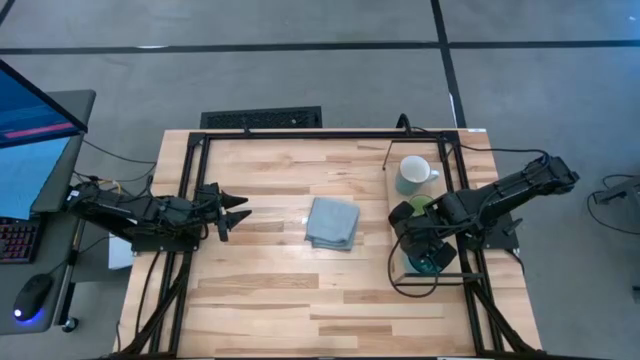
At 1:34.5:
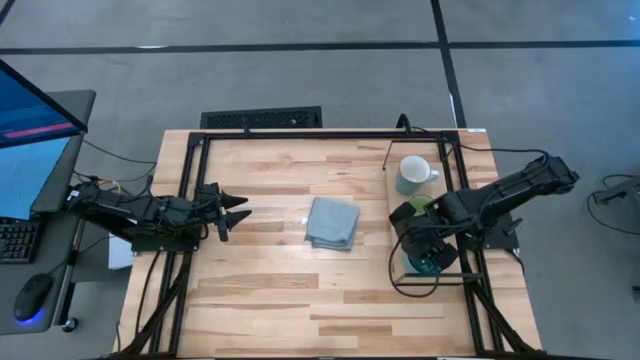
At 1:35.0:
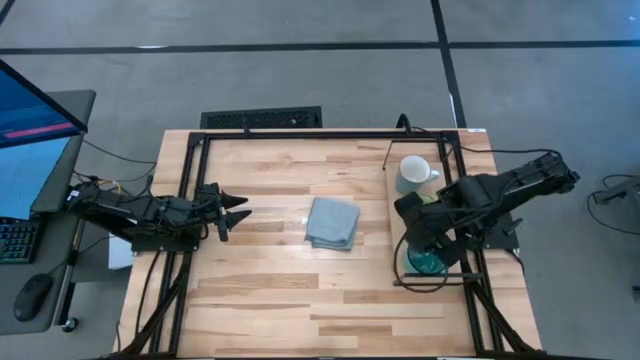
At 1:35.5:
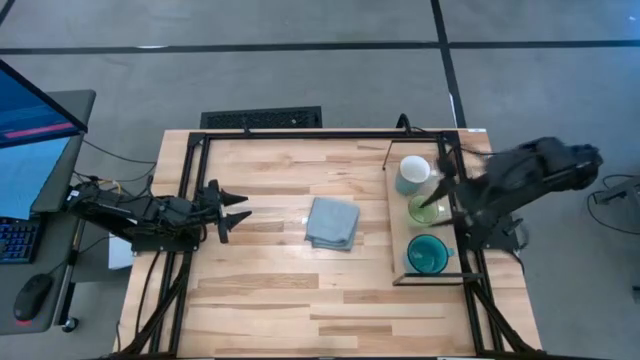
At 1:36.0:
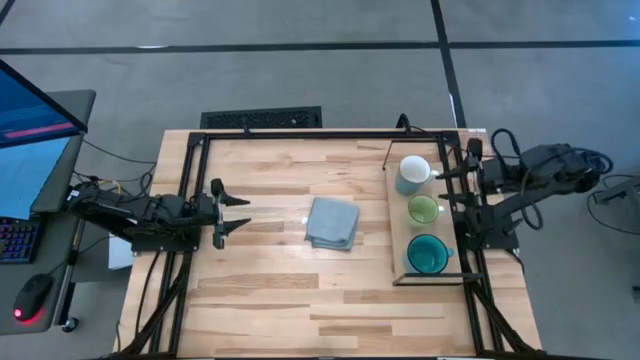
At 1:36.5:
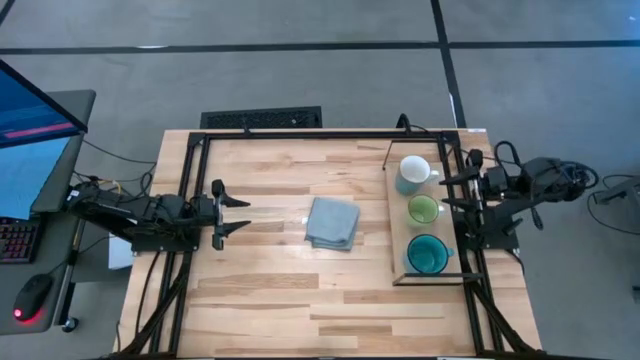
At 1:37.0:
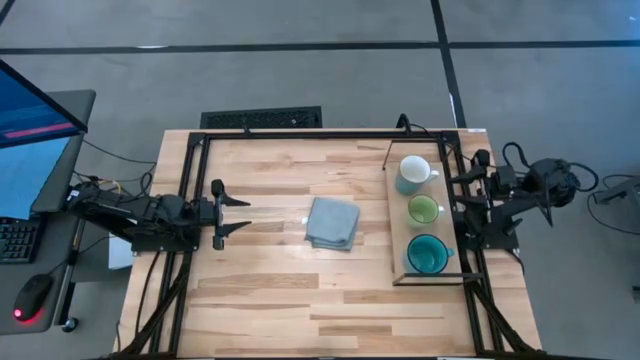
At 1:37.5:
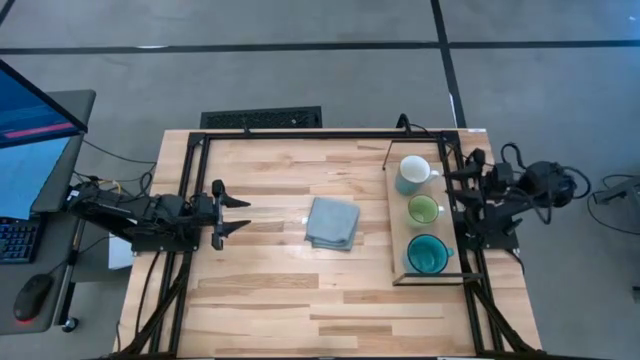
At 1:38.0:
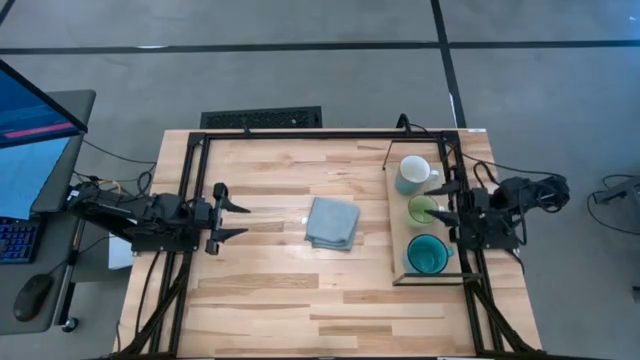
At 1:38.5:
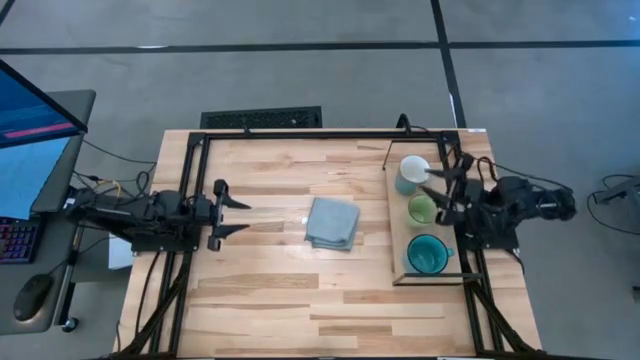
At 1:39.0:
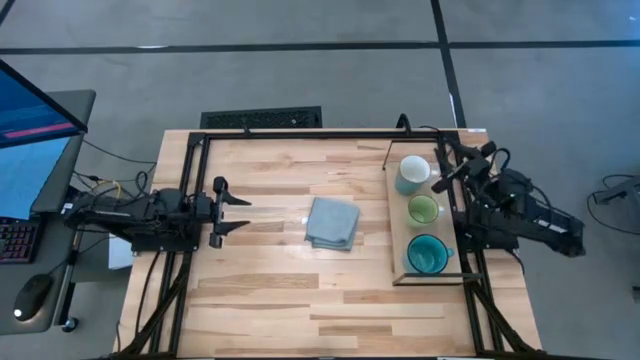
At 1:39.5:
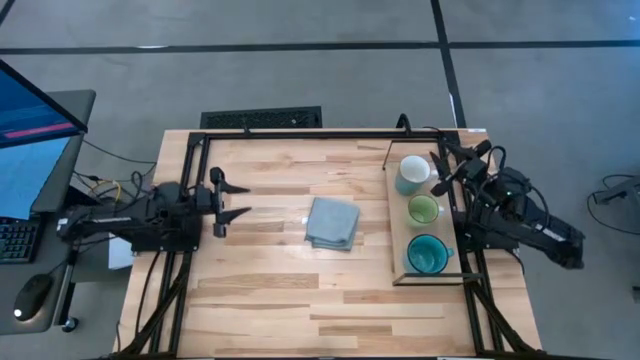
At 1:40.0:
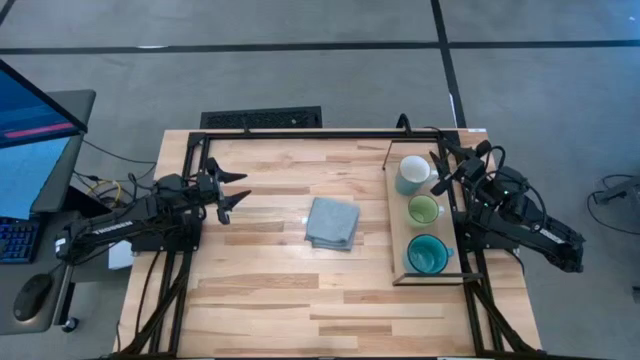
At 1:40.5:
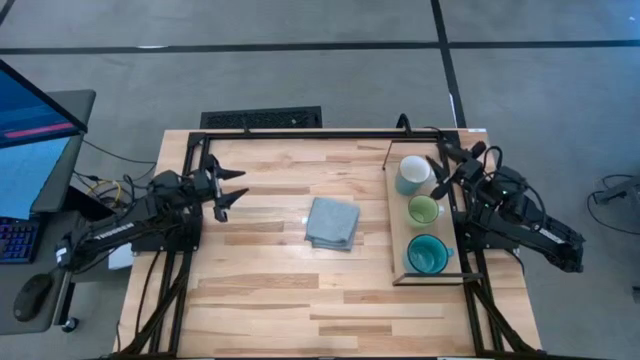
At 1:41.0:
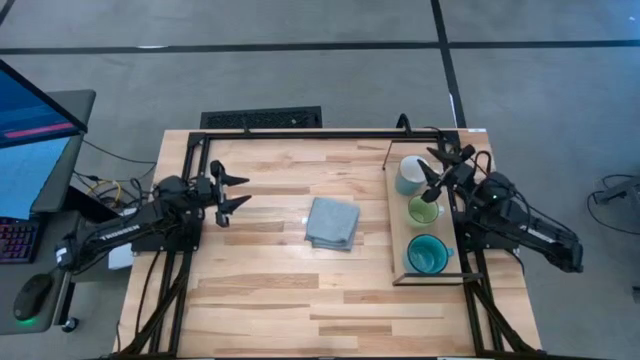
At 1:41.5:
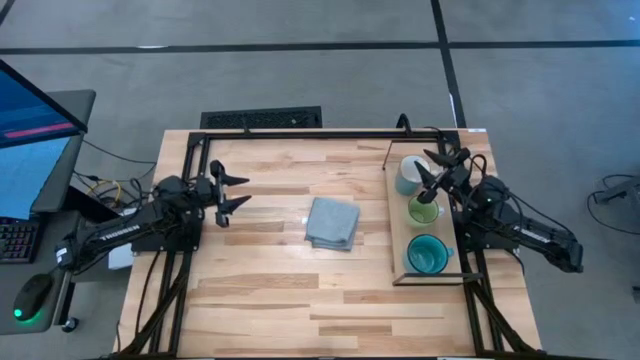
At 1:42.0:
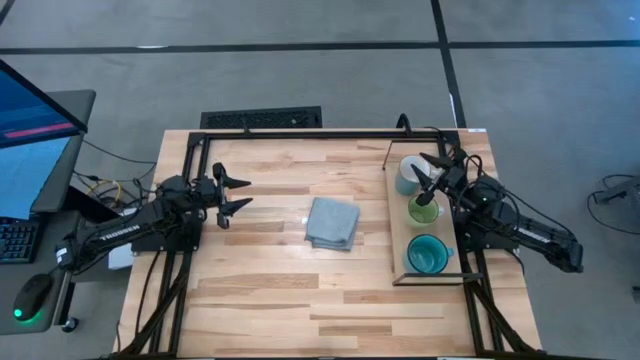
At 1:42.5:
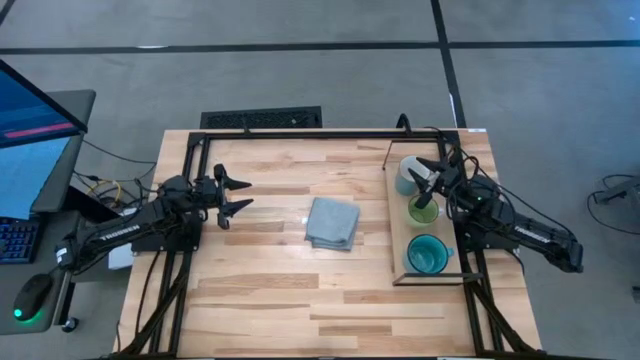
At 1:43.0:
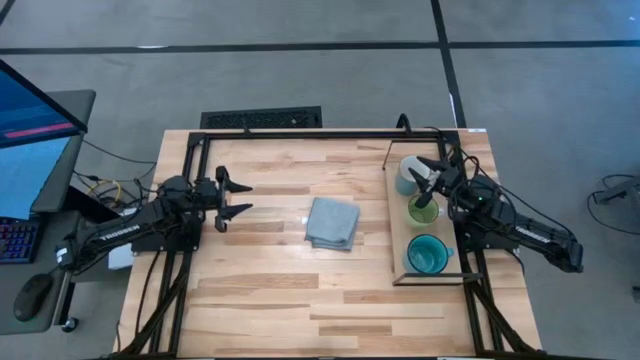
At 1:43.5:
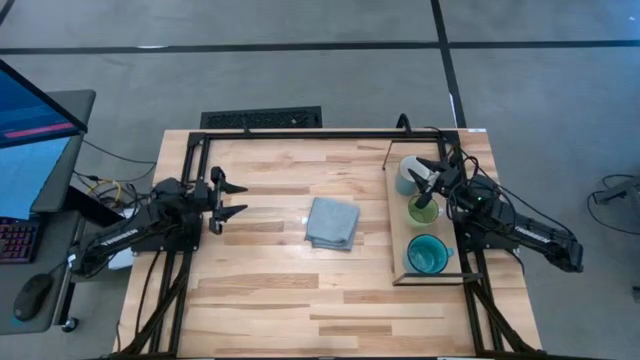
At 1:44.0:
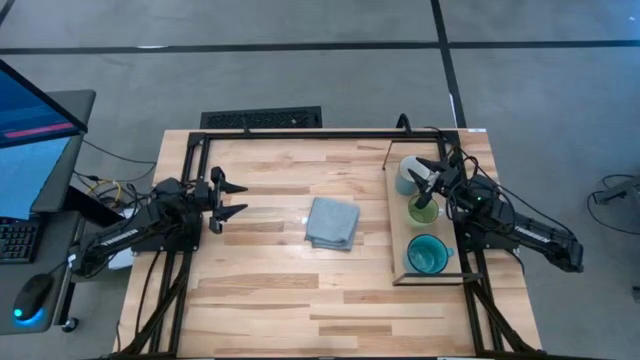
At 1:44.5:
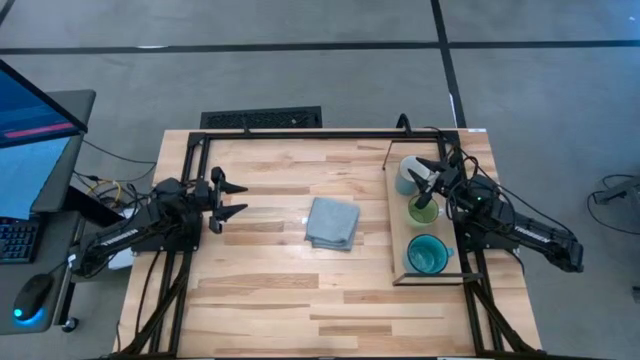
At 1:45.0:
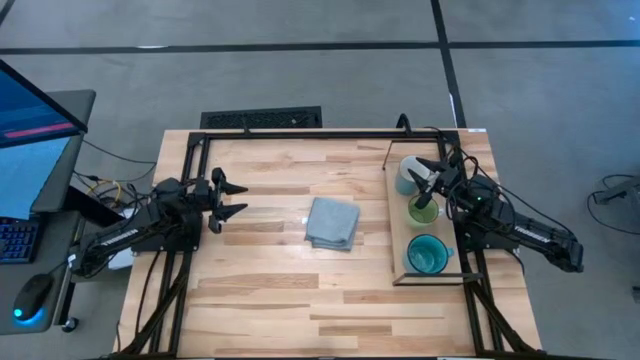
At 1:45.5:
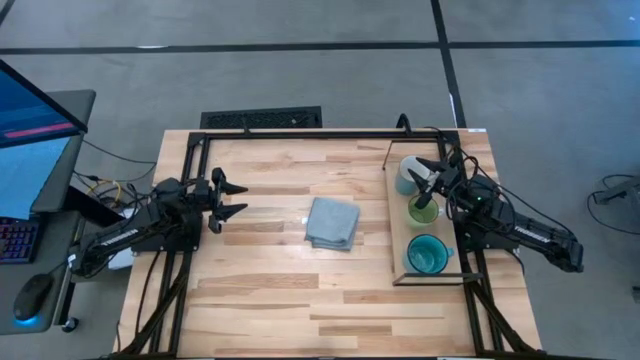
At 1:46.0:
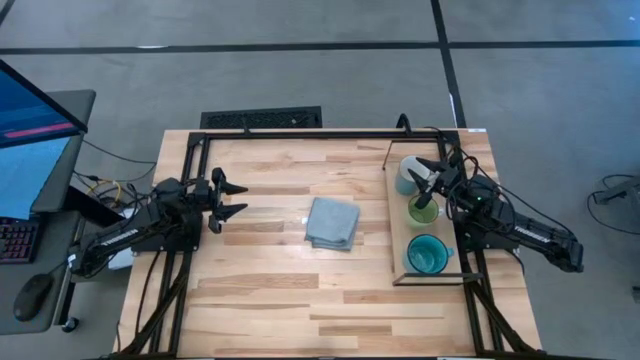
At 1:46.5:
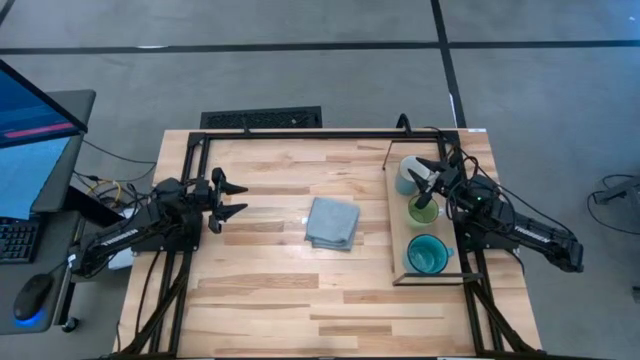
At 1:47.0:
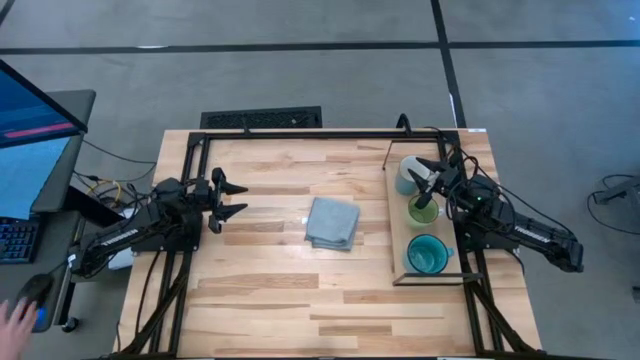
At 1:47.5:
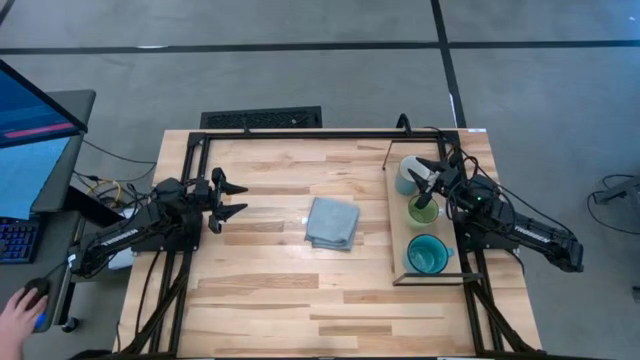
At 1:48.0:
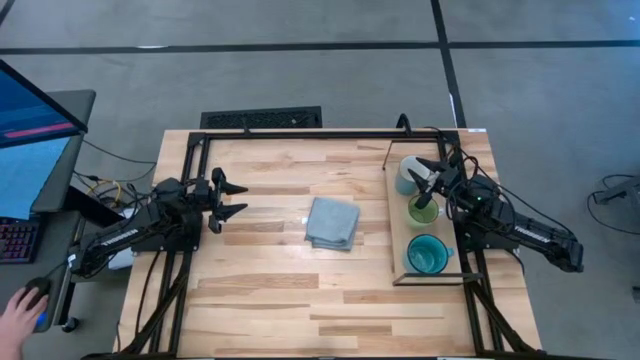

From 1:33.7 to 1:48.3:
Task: Stack small to large cups/mugs on shelf
Return to Home Position
